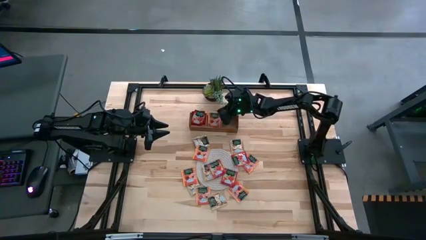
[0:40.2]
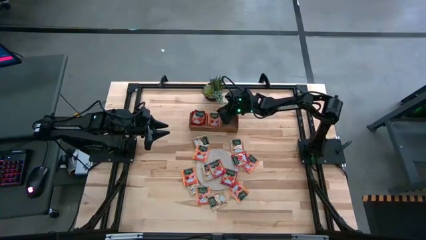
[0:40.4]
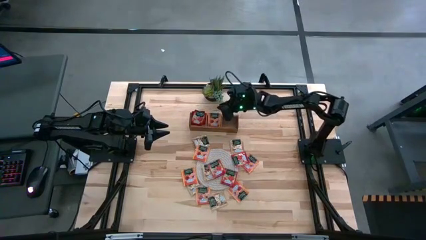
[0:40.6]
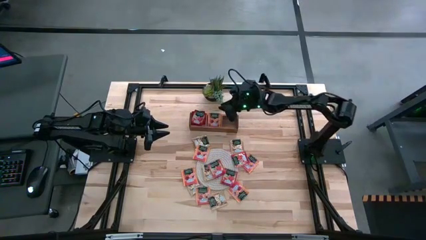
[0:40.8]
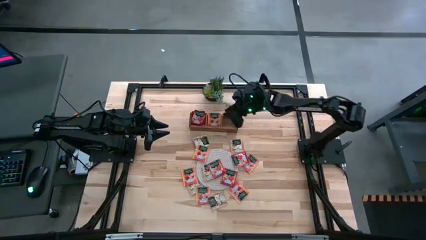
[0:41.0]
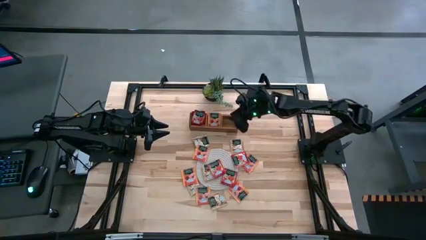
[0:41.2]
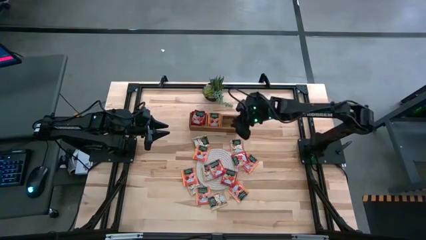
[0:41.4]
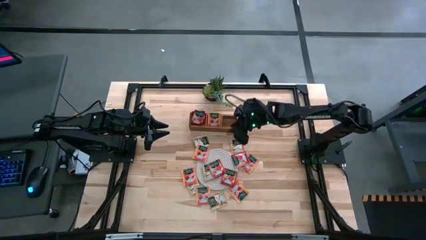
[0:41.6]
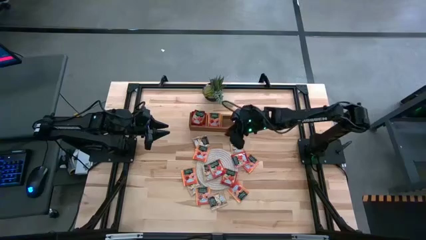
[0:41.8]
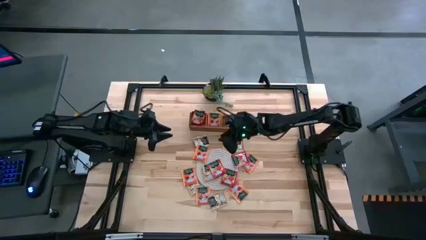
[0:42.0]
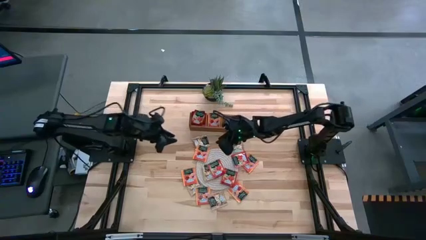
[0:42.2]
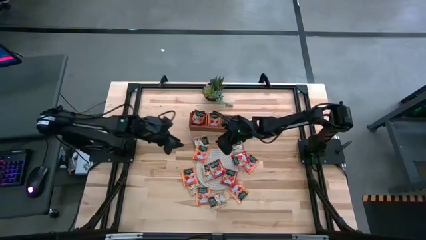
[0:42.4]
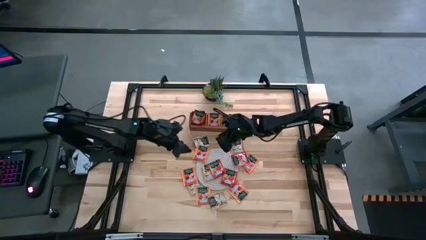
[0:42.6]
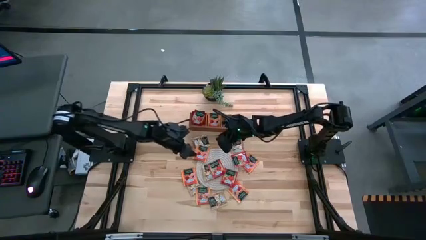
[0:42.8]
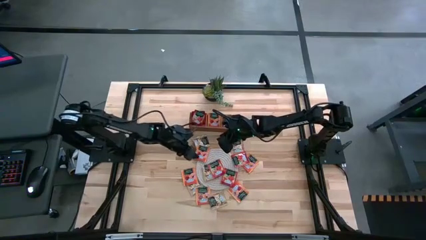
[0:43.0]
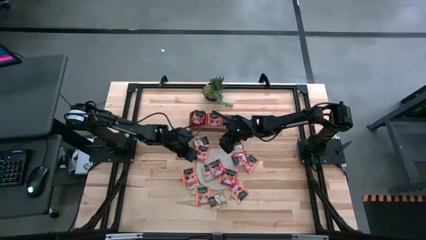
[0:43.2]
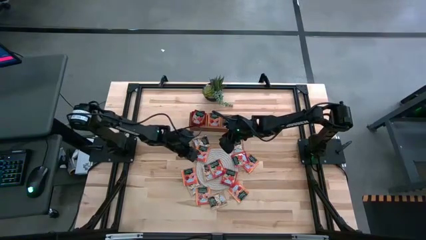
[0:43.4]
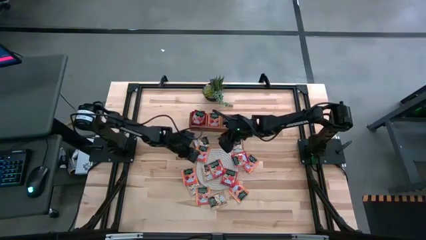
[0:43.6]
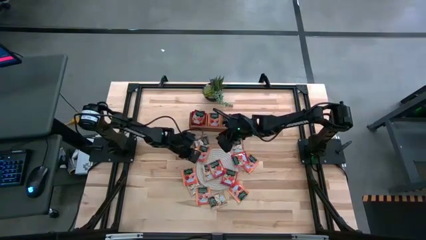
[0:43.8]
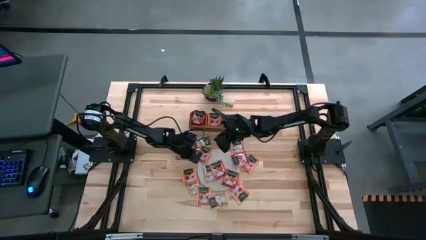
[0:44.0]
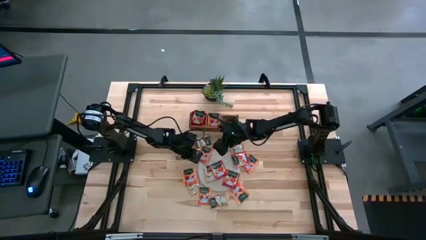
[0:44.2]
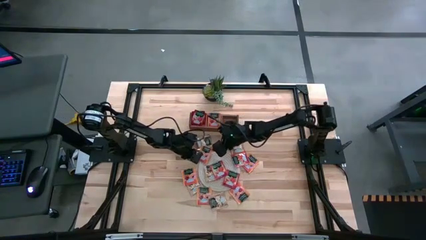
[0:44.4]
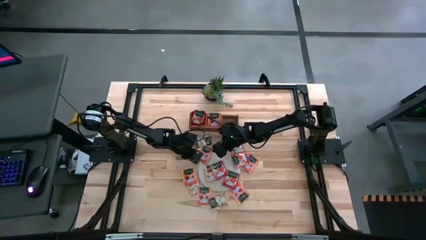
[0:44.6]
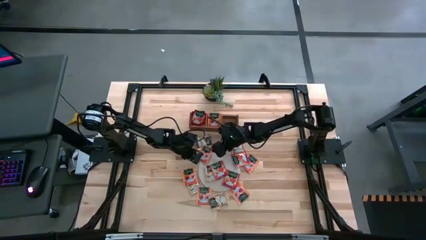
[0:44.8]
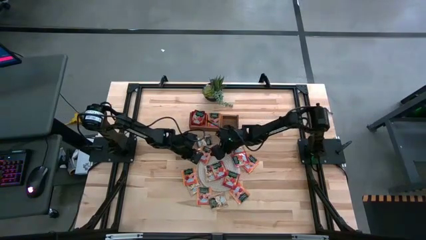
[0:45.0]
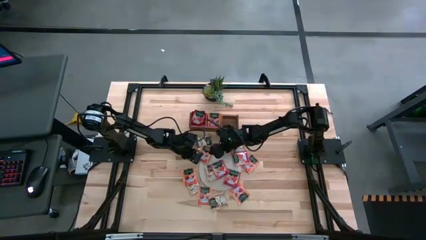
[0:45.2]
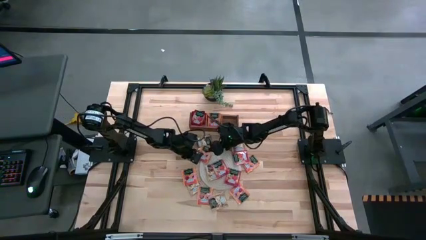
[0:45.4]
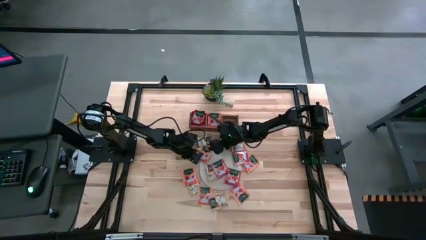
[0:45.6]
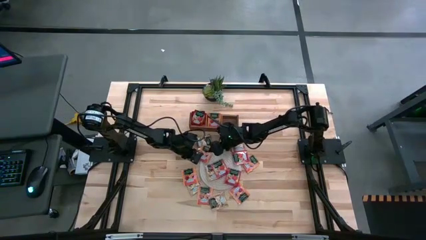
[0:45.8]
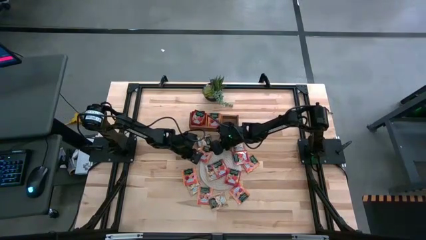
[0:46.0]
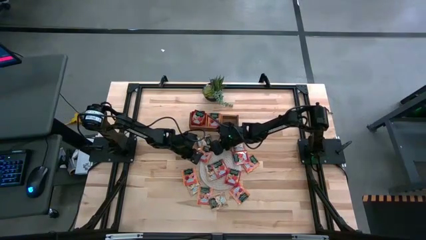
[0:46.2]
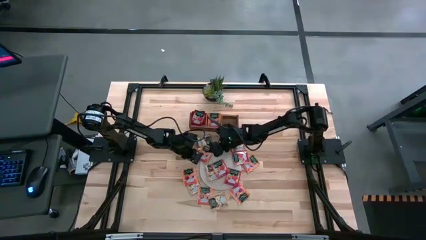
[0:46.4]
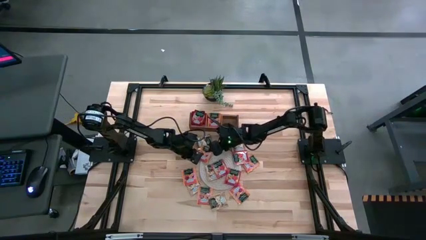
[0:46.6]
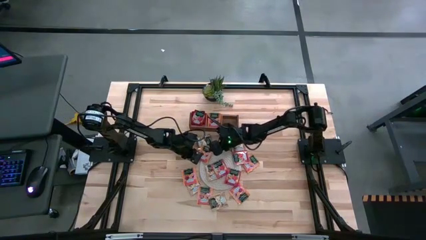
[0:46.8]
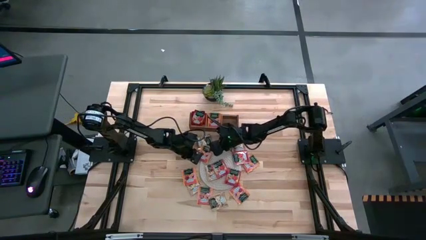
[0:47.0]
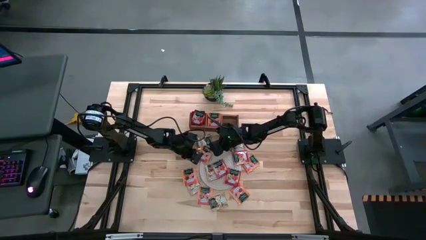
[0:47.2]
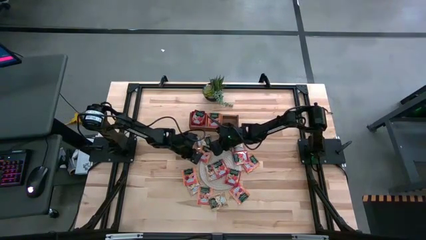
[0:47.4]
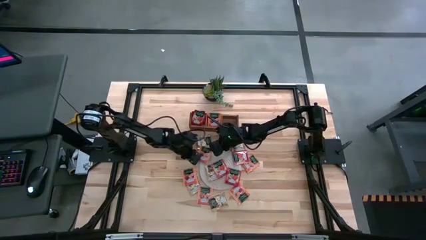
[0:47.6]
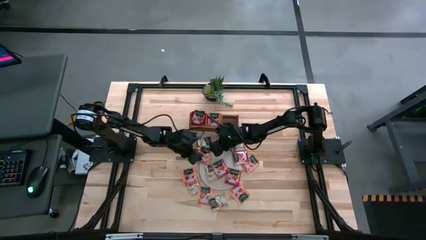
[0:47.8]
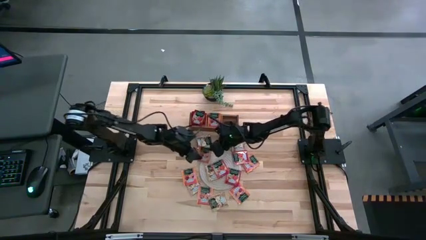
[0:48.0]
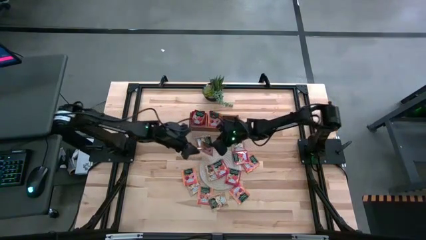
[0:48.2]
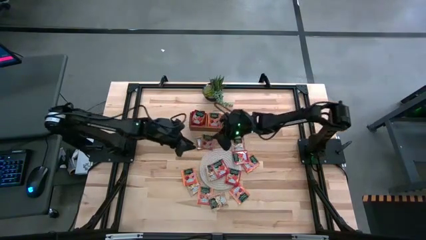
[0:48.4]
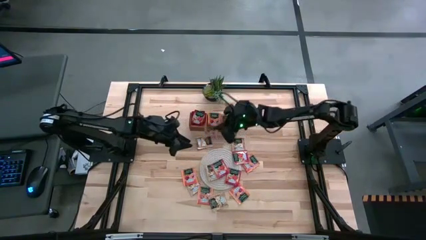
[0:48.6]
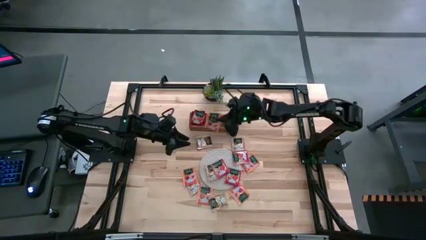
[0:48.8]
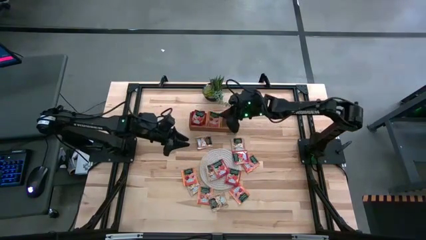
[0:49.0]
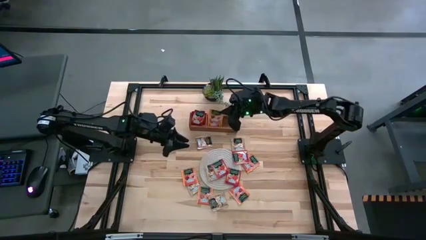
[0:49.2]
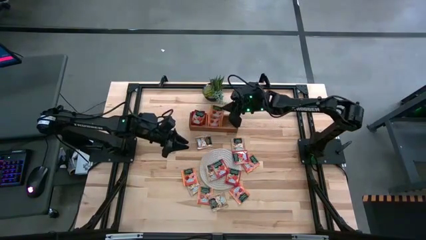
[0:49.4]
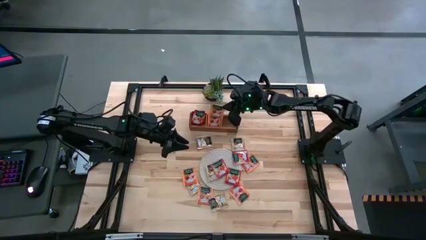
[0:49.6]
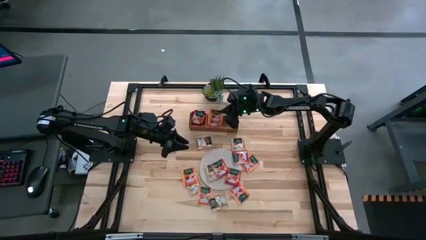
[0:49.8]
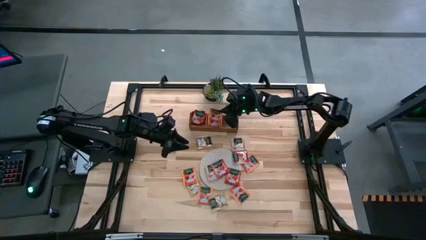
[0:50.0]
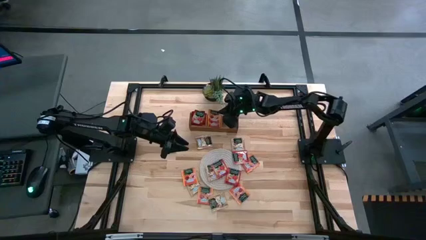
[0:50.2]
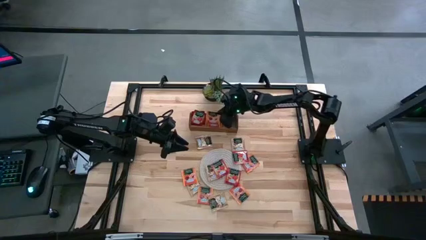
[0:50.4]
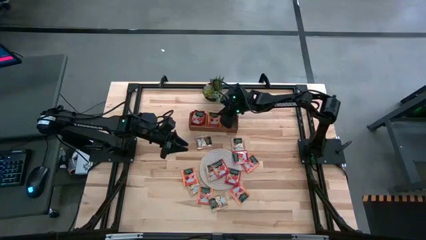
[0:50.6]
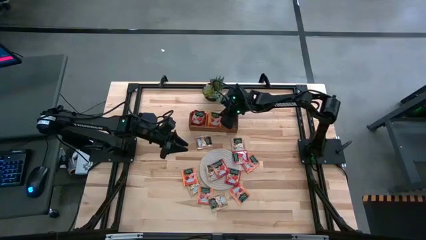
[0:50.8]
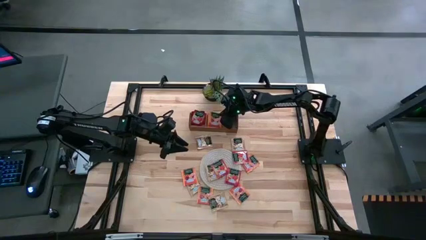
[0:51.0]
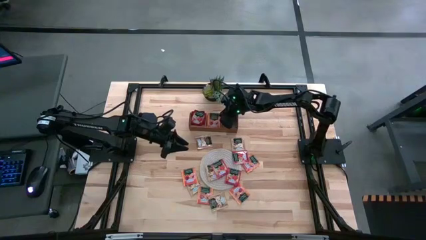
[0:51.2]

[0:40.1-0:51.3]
Task: Pick & Place Tea
Put the orange tea bag into the middle section of the wooden organizer
